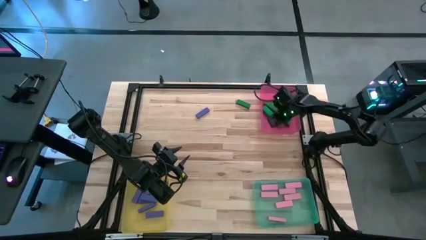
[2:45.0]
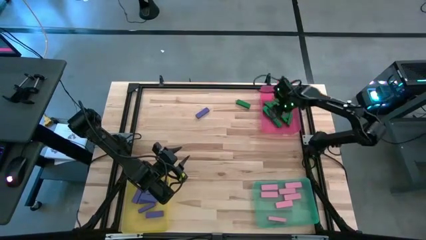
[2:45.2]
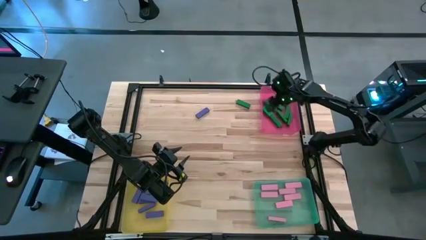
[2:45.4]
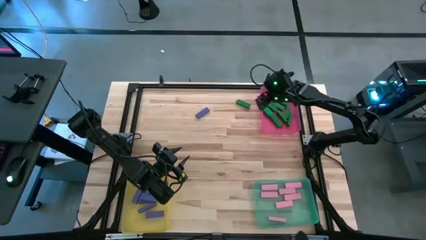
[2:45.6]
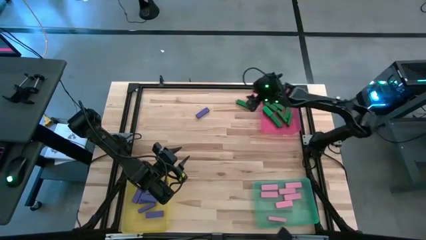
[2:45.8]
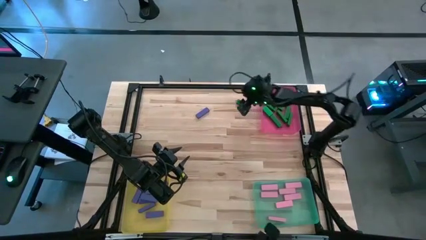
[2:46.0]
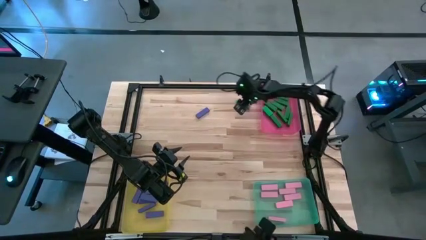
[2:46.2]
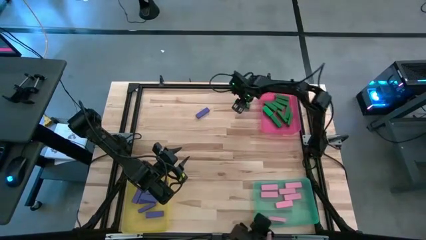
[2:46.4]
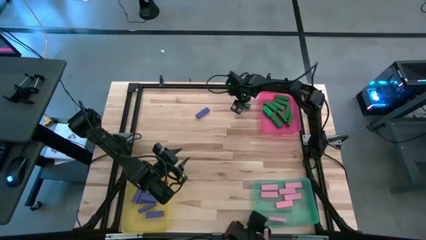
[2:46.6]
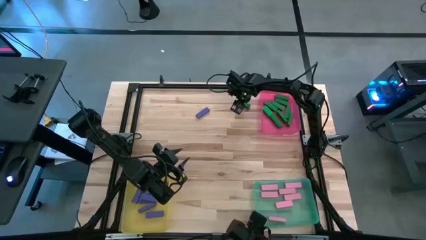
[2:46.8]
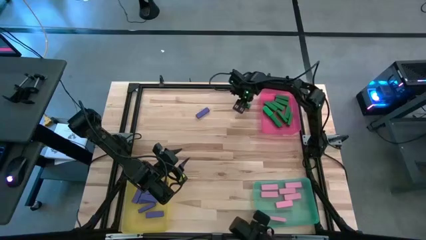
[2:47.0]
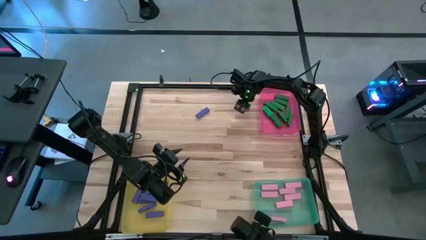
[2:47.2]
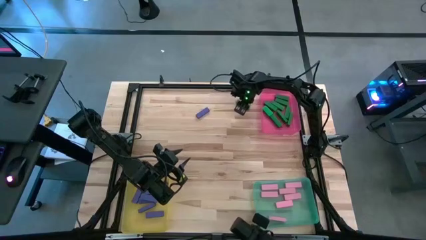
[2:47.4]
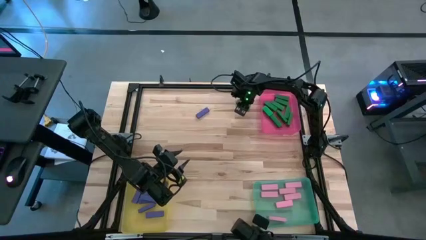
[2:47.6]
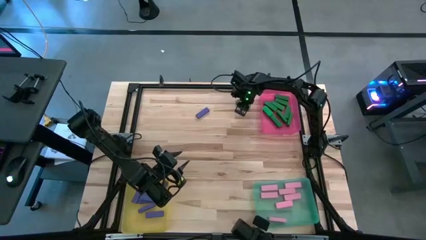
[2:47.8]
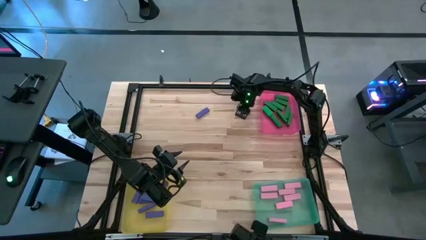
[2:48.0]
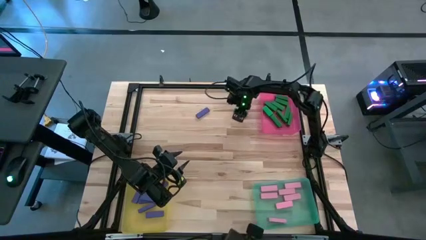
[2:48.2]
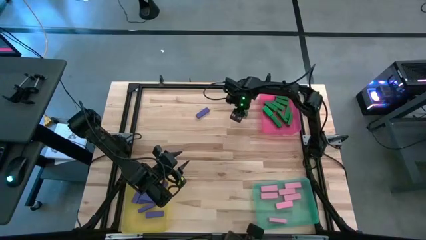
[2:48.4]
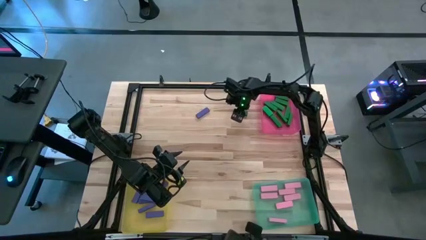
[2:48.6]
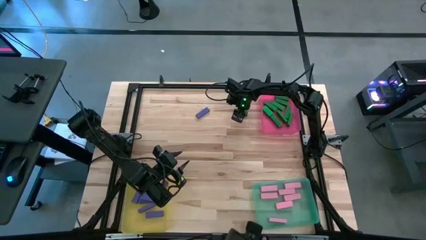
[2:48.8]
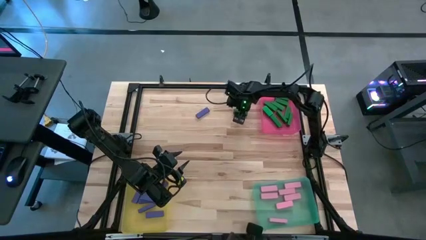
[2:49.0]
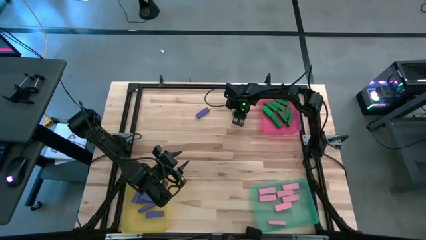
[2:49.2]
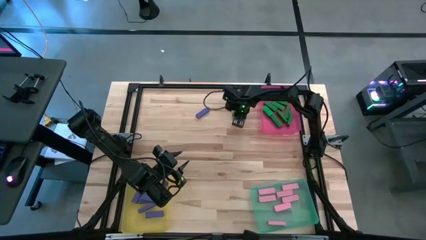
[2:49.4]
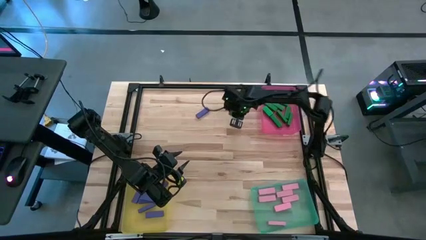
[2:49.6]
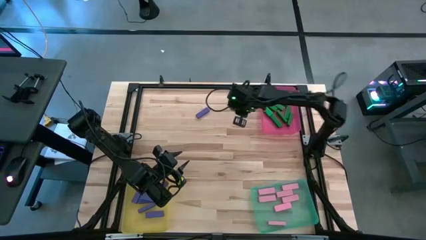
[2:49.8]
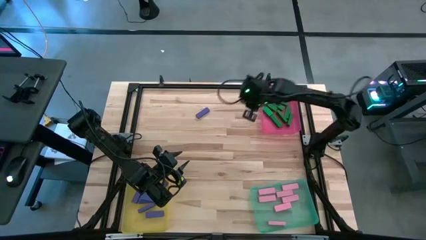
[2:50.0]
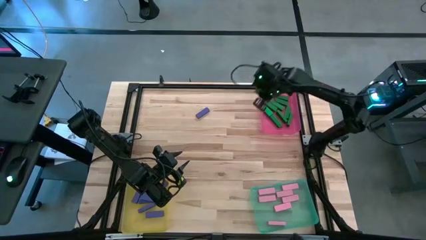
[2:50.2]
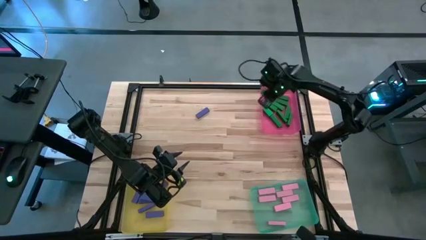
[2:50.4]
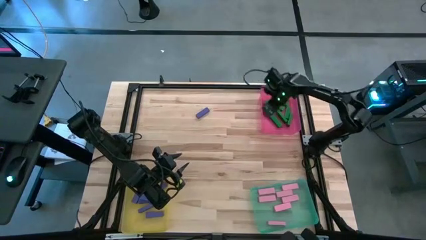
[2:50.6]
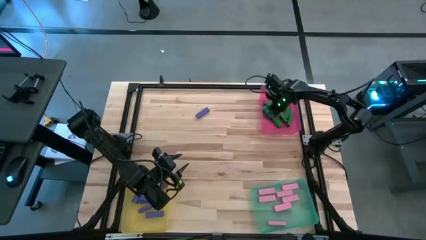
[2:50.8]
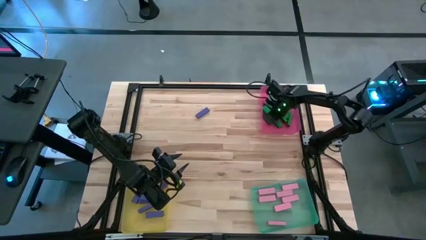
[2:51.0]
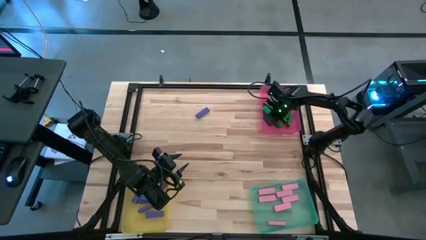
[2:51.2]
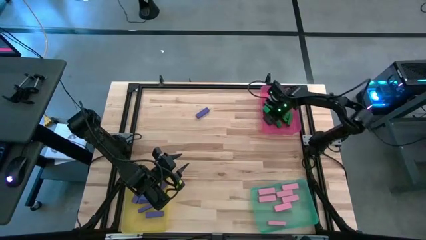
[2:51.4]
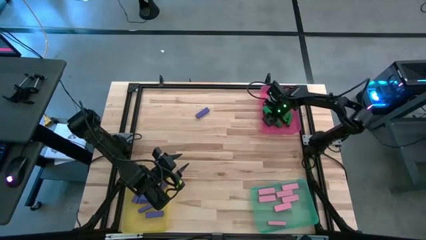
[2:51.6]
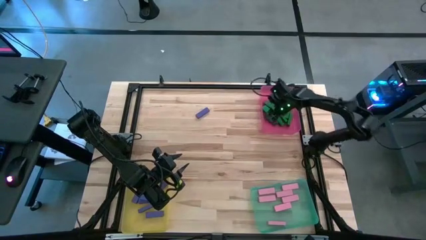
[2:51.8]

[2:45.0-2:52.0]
Task: Sort blocks
Put the green block into the pink bin

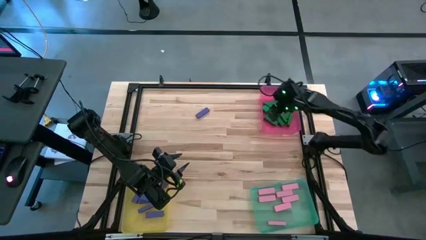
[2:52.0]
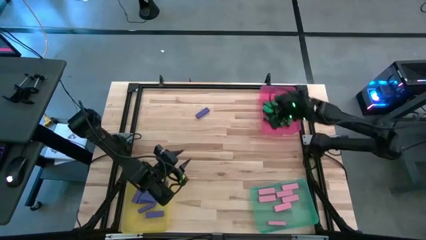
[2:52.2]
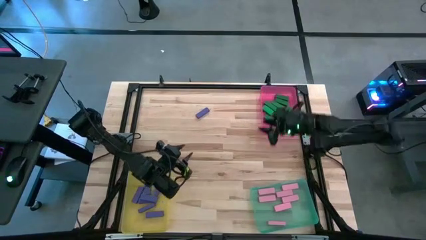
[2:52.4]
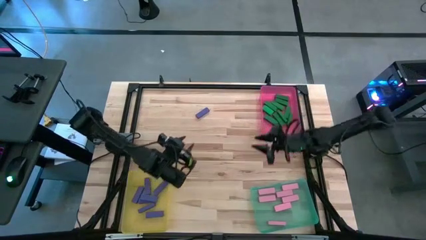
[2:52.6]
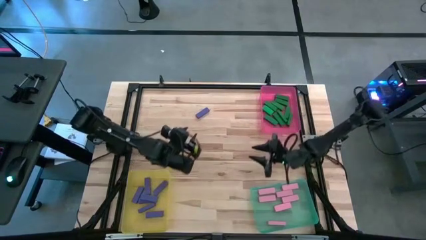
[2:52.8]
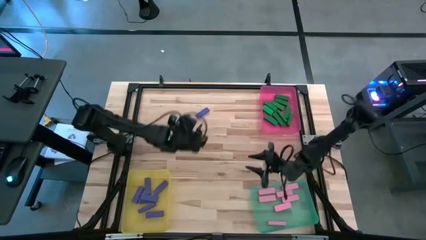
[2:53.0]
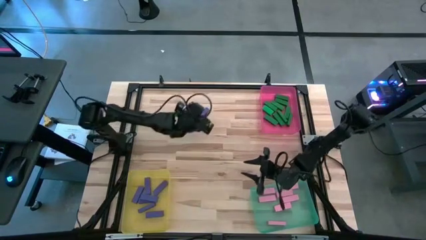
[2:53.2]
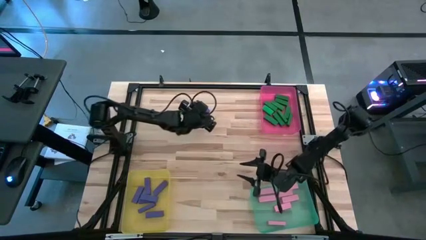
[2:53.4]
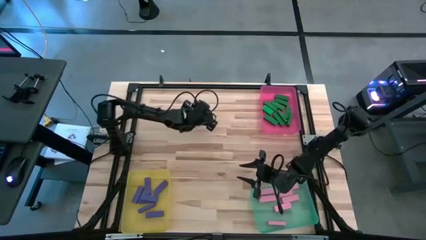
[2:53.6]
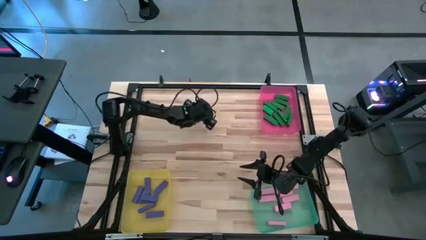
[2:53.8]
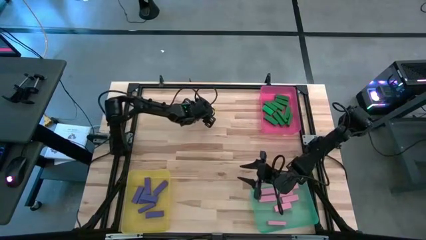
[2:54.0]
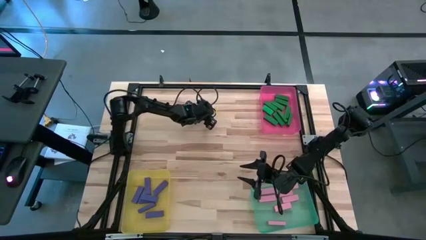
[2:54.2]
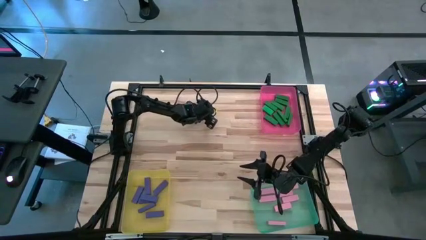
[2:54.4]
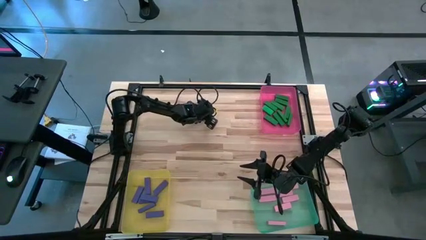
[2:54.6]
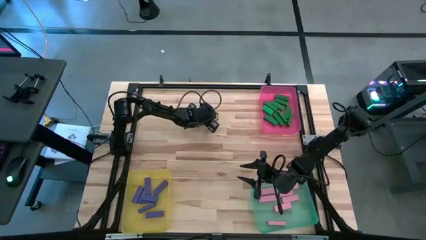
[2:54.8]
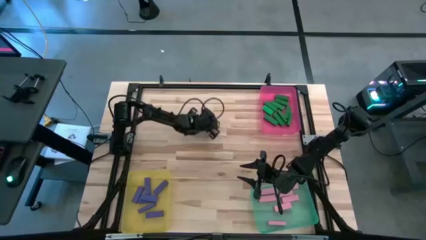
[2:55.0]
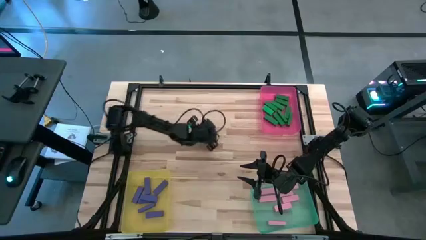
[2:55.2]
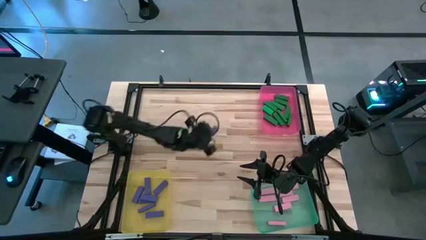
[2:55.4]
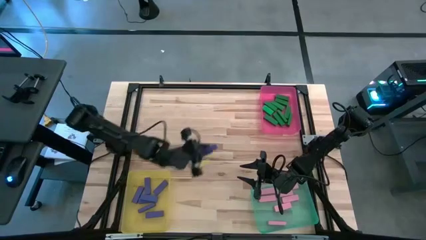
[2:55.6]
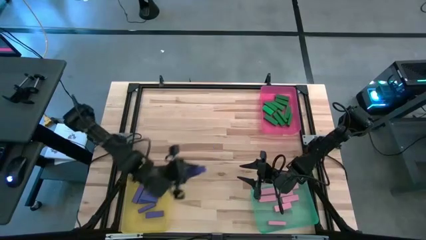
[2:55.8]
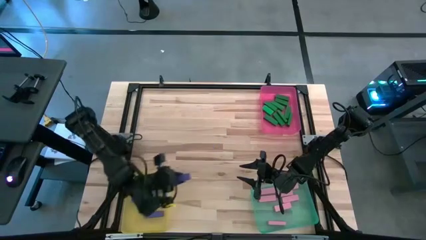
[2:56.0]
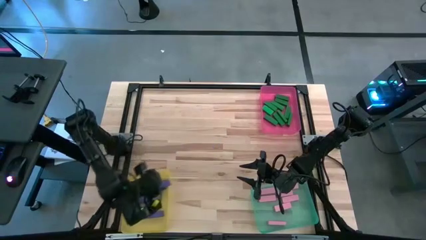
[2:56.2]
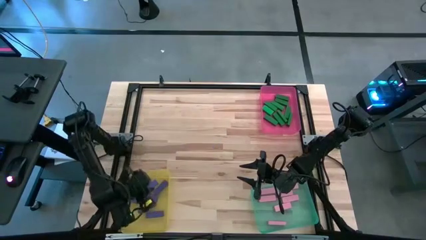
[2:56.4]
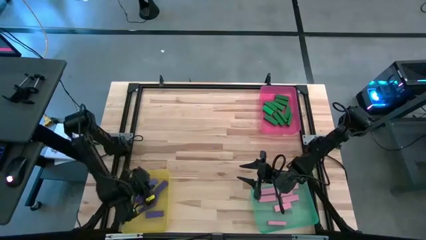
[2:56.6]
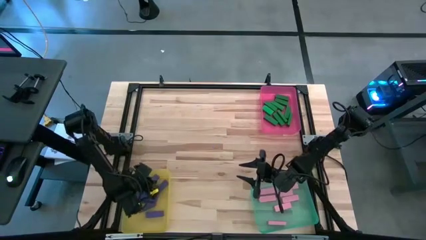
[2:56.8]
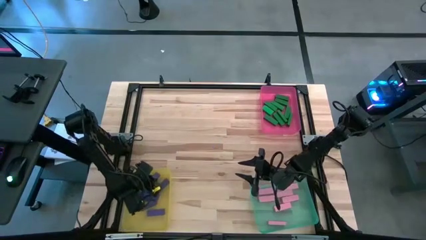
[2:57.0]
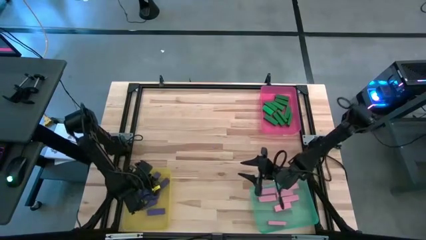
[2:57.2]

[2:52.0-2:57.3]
Put the blue block into the yellow bin

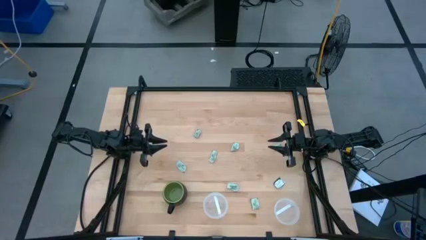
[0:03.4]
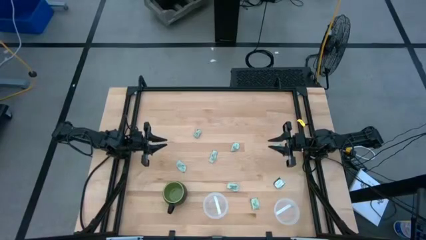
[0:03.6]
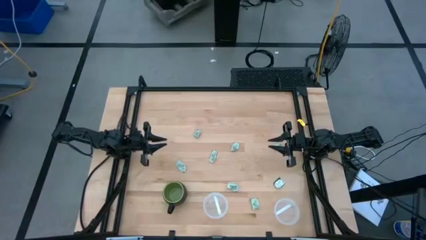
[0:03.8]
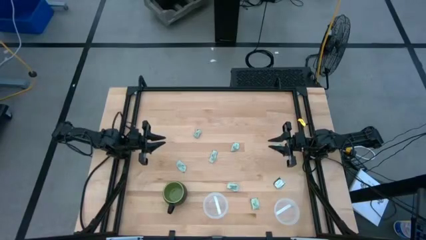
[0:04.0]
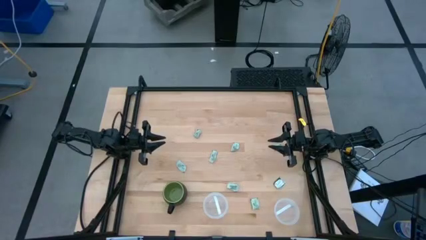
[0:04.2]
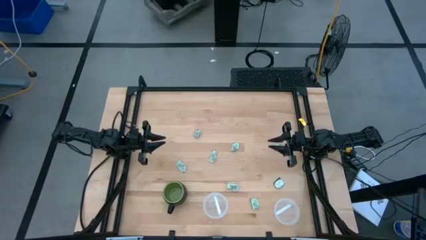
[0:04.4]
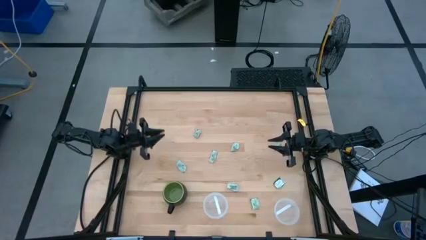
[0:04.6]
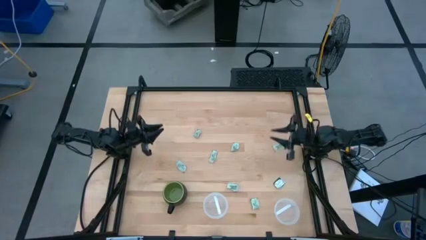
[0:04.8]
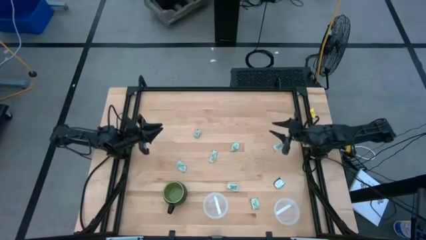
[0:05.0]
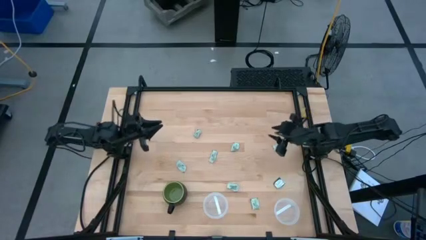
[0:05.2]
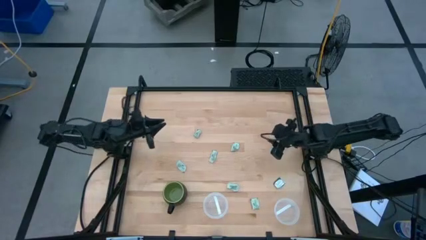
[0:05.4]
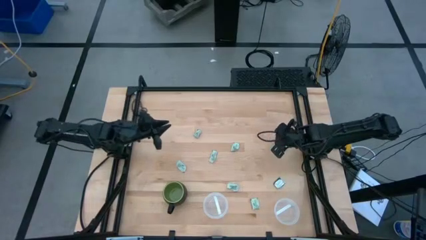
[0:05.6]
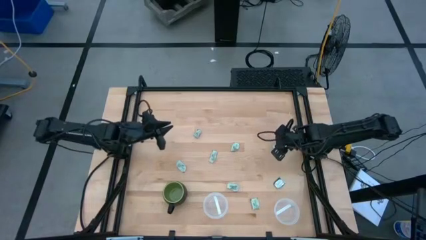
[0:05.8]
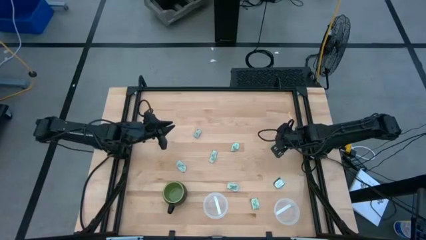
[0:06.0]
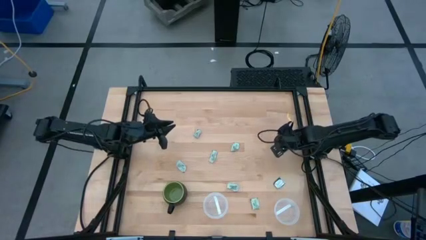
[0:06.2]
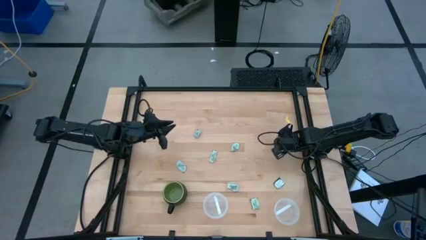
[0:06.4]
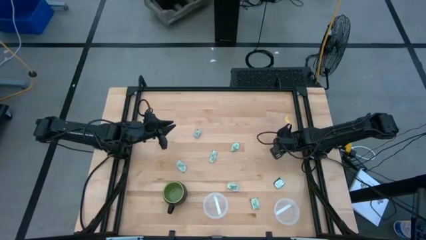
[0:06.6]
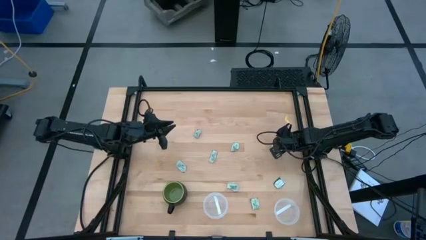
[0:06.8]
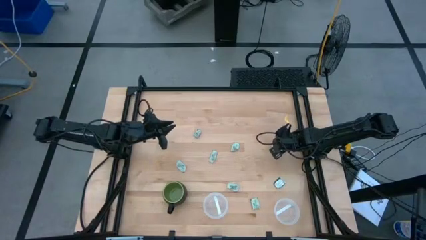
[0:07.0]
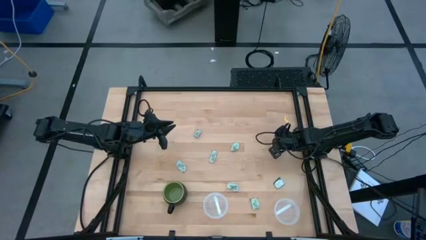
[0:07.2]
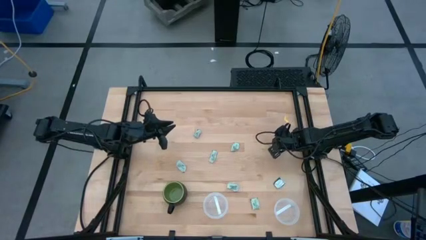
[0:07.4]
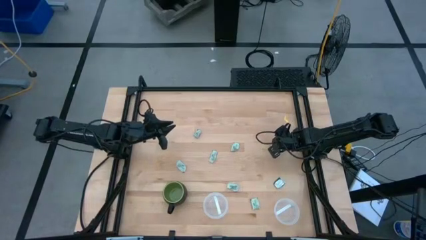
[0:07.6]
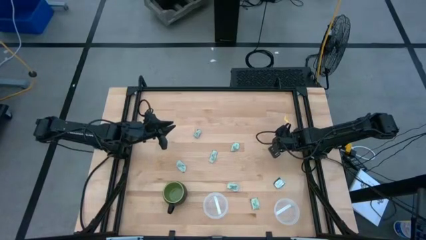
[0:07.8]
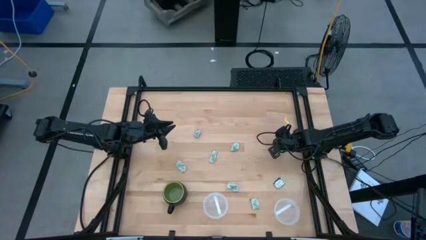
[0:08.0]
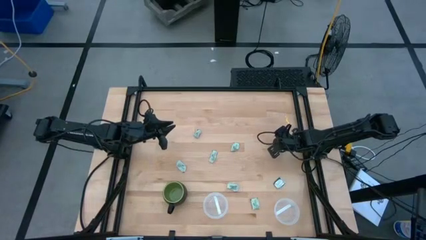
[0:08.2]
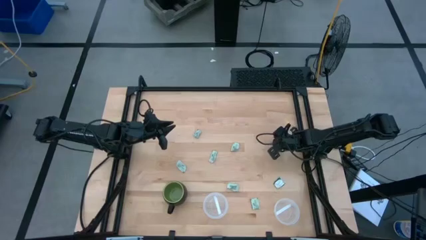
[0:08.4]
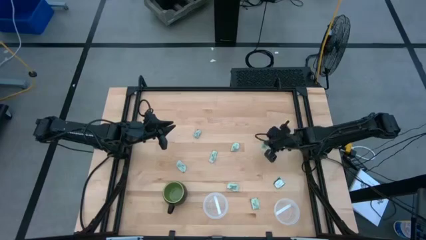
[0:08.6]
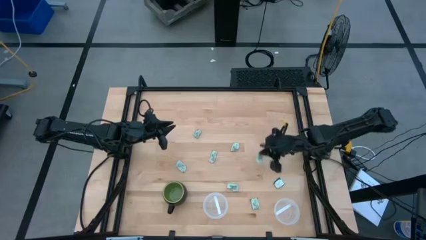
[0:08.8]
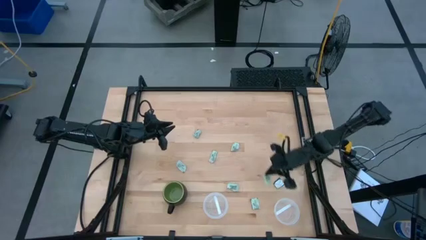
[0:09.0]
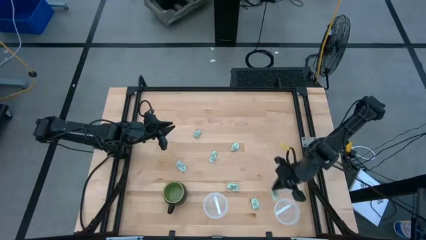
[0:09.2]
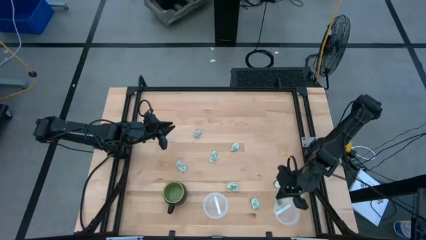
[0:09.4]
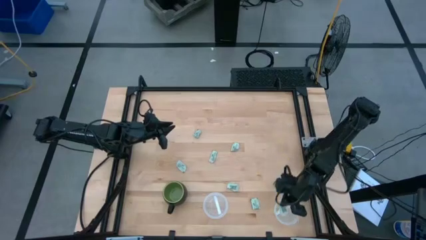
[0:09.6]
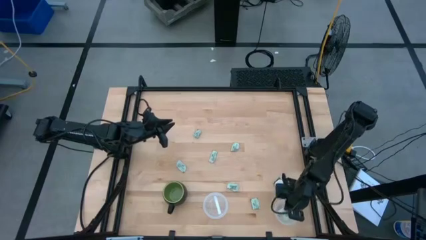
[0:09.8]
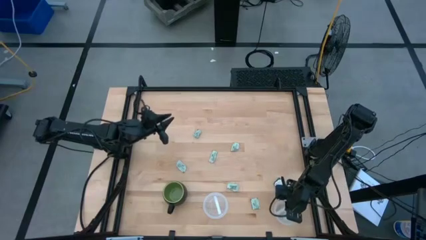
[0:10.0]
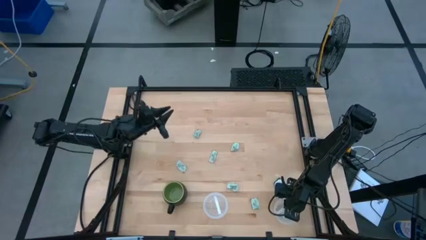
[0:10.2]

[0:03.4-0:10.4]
Task: Pick and place Stevia / Truvia into bins
Put the green stevia packet into the right transparent container
